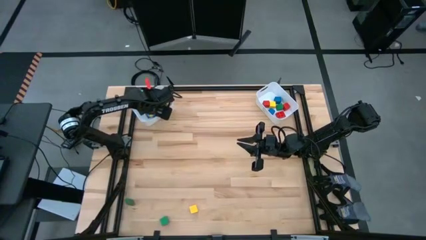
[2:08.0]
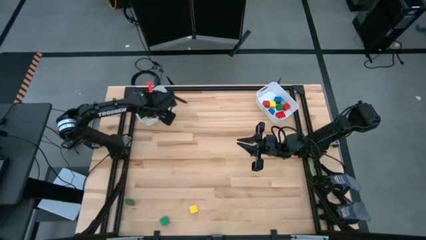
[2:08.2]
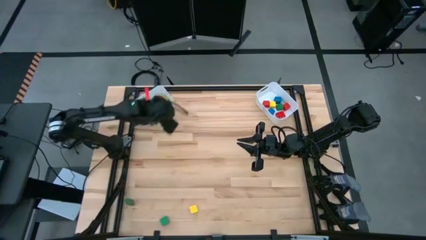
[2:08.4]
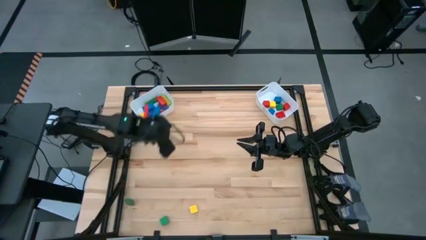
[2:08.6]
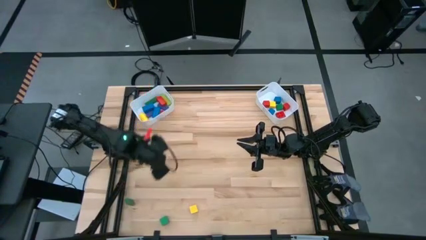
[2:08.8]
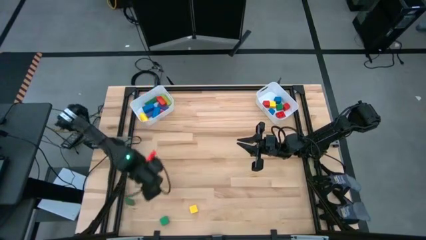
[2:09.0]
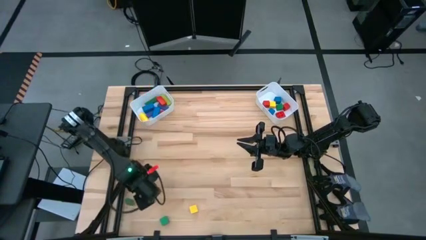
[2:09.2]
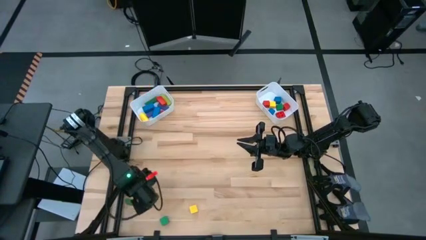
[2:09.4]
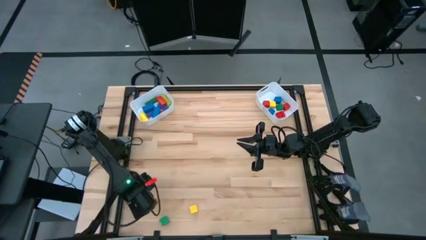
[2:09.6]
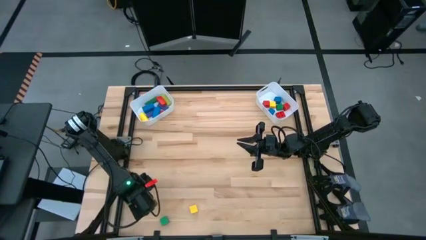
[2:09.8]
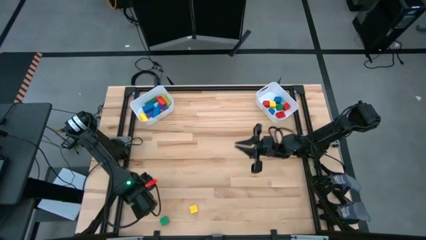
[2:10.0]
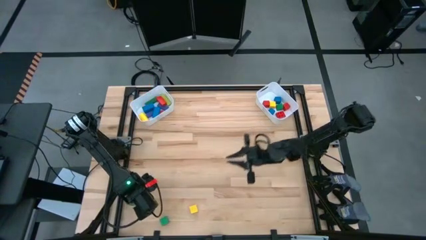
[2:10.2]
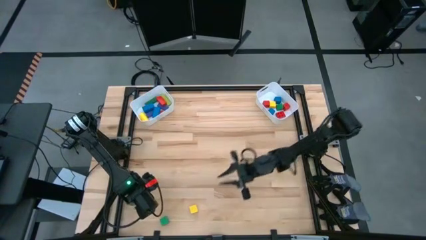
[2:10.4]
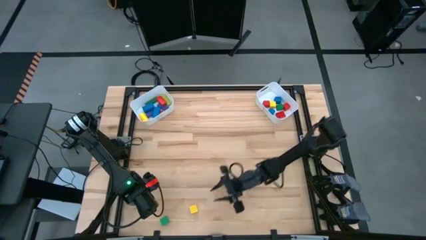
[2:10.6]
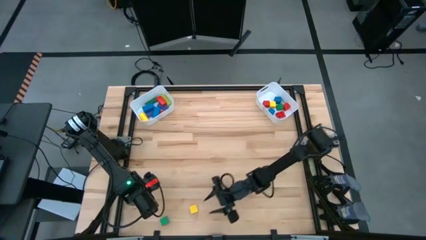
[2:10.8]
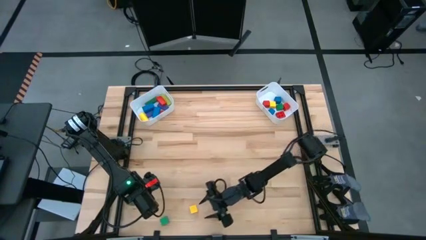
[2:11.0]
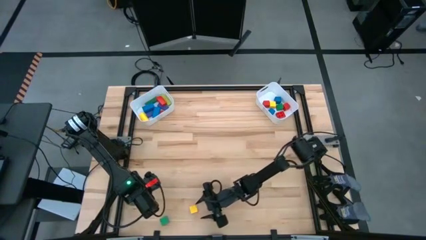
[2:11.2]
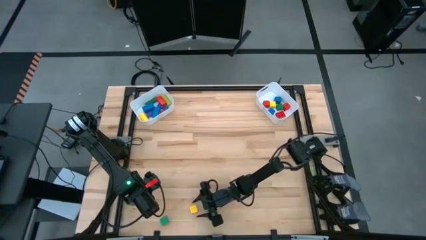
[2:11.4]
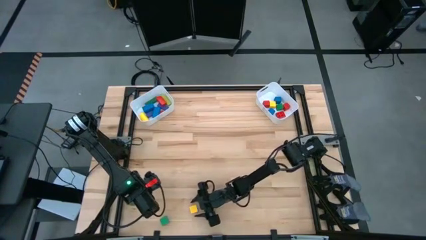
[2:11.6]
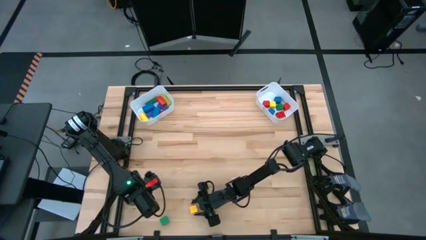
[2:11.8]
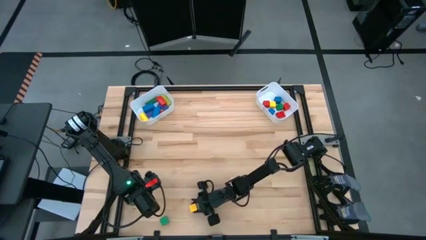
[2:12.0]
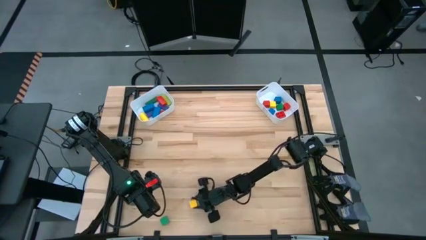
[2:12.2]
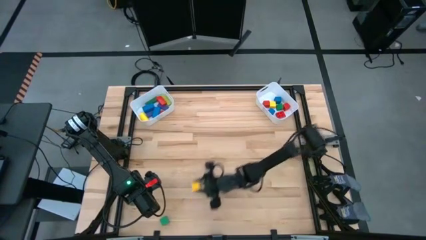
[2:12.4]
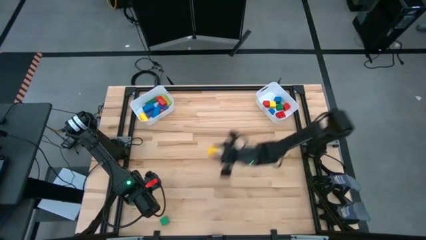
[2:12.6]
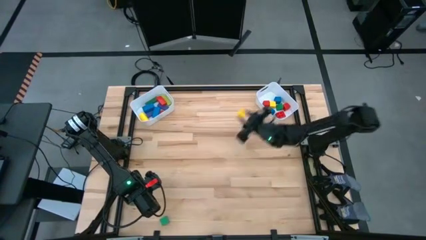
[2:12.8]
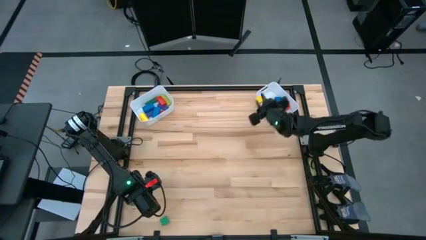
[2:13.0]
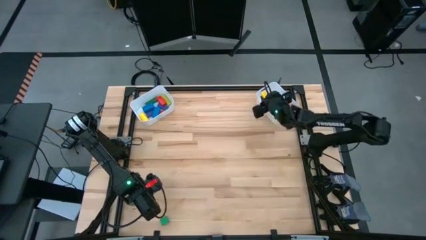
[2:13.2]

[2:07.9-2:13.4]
Task: Sort blocks by size
Put the small yellow block into the right white bin

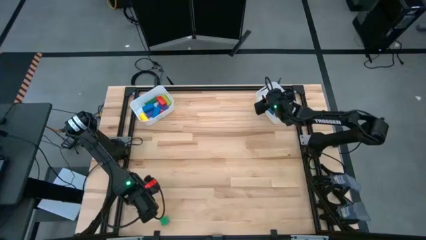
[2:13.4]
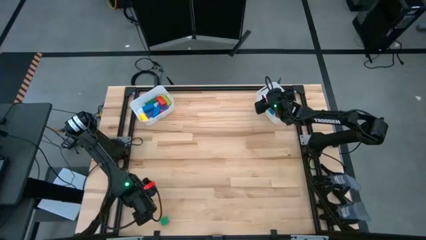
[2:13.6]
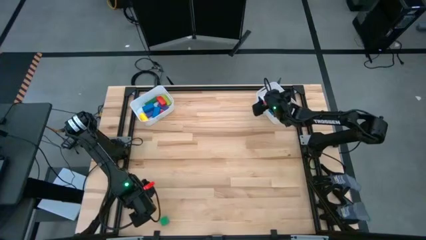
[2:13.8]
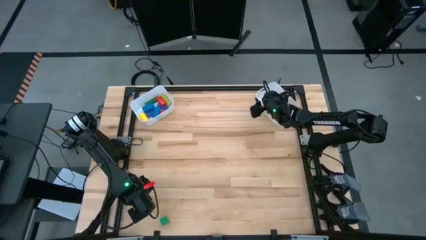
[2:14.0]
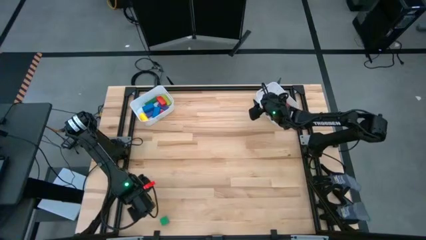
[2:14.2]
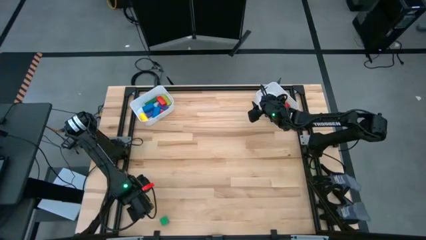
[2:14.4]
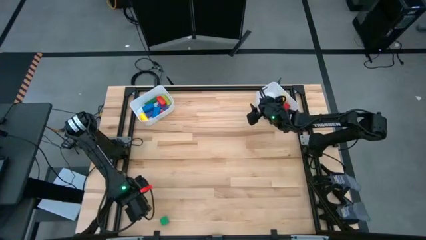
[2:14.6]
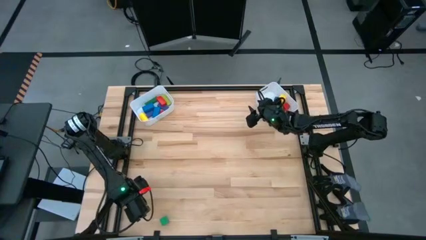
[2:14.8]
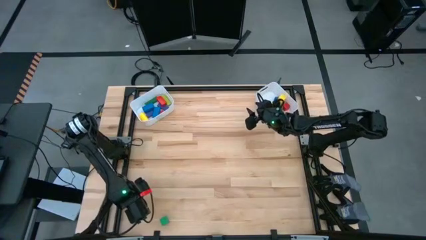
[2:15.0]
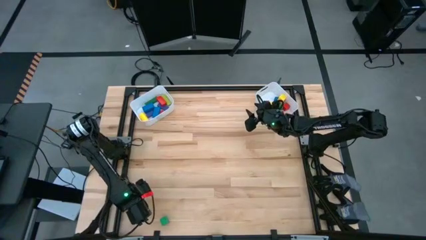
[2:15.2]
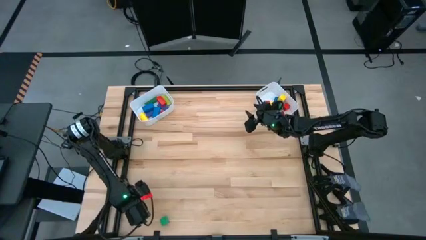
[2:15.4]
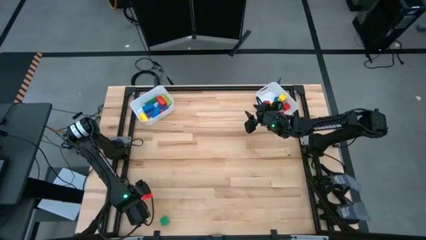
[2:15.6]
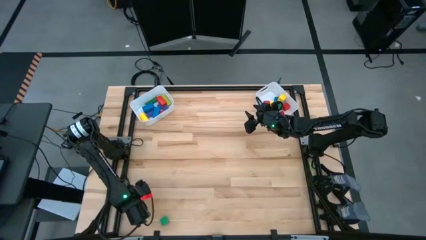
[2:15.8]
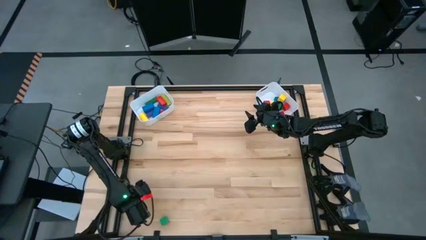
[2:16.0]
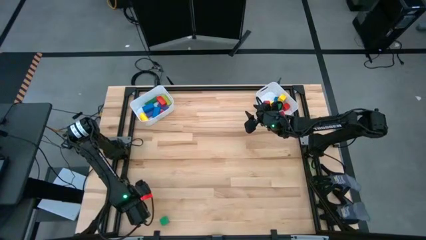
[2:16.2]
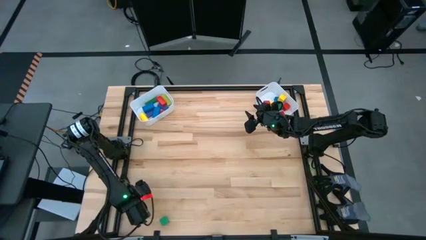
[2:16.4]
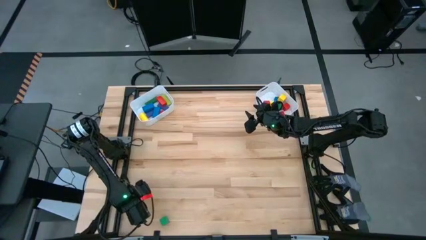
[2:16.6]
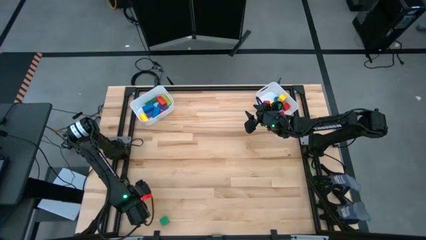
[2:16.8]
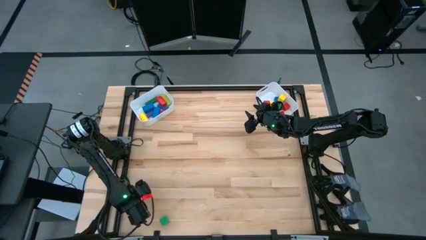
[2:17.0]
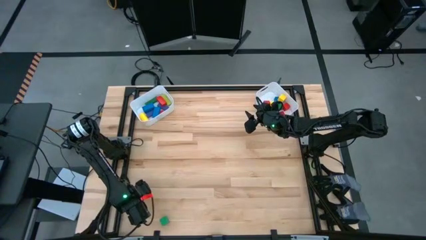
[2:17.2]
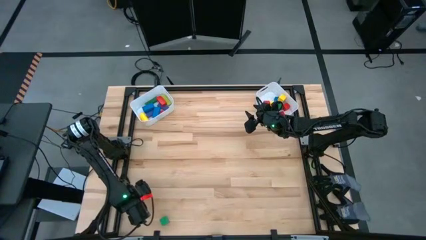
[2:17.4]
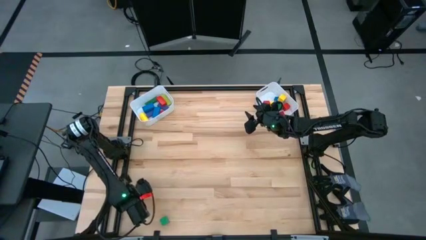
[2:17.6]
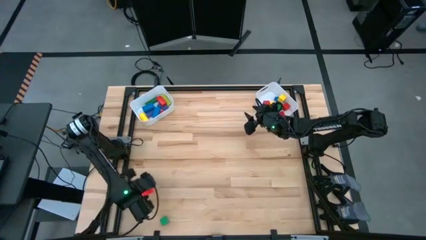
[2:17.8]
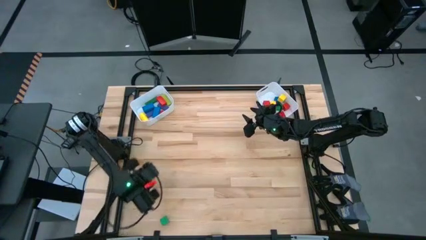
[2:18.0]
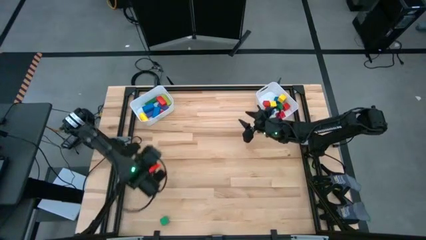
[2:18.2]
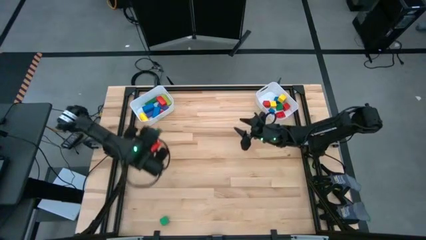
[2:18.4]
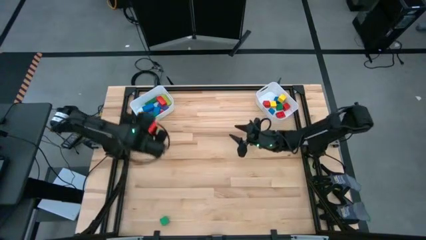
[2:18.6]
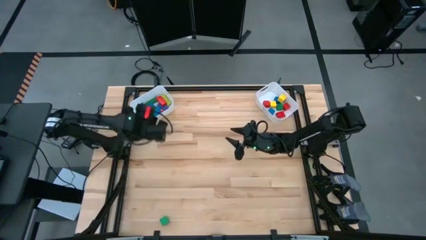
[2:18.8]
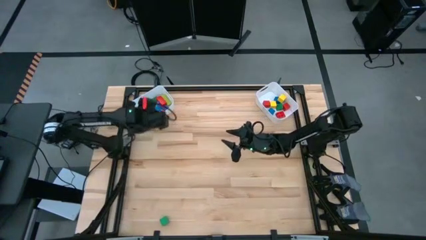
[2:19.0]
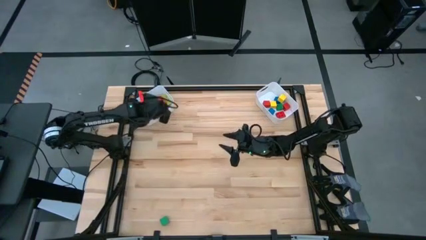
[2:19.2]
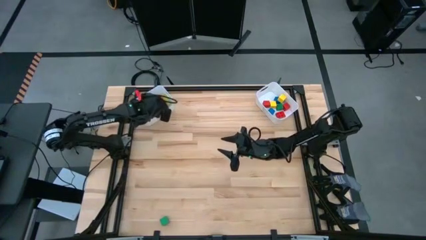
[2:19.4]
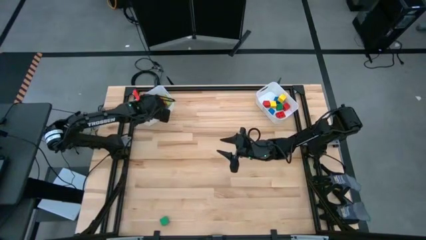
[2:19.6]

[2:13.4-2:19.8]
Put the large green block into the left white bin

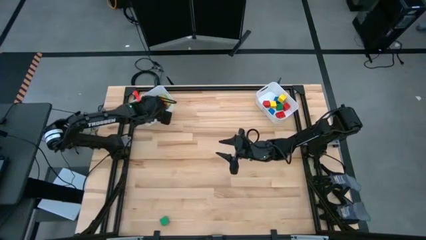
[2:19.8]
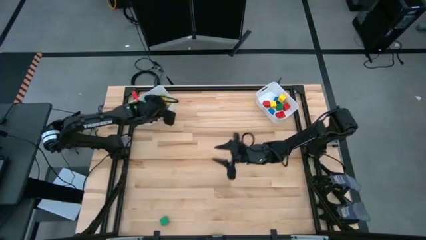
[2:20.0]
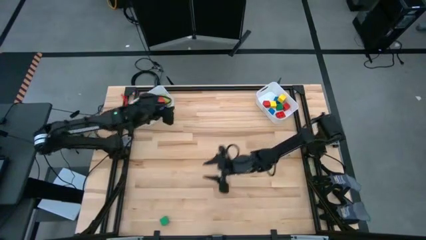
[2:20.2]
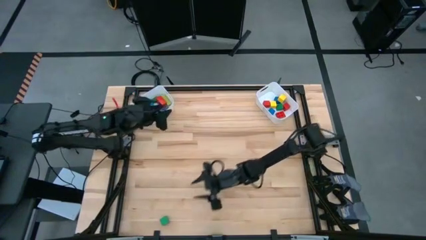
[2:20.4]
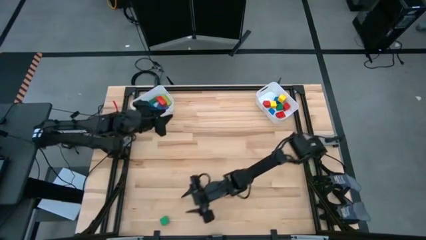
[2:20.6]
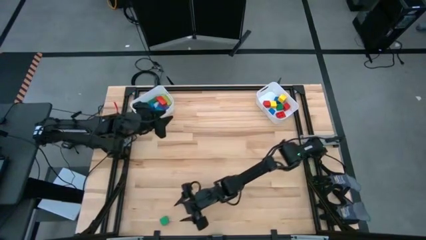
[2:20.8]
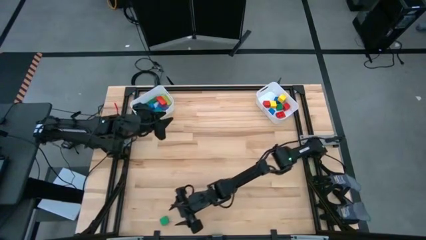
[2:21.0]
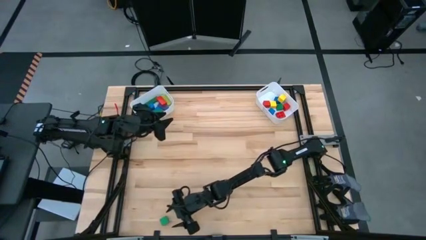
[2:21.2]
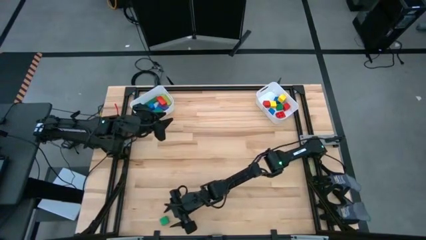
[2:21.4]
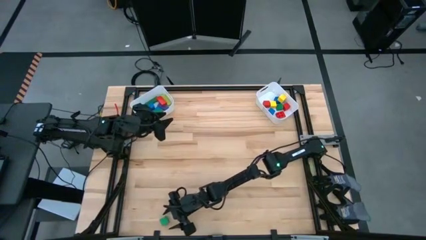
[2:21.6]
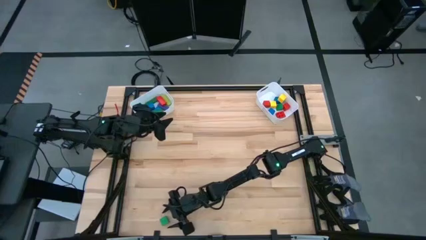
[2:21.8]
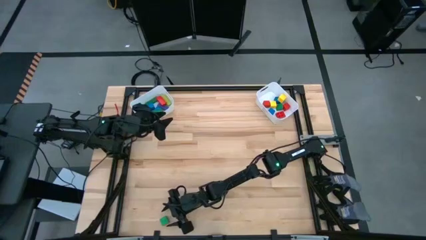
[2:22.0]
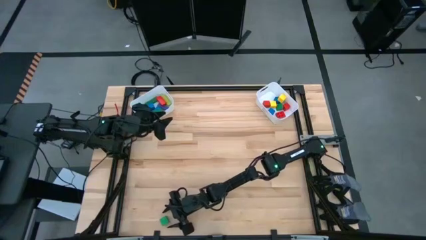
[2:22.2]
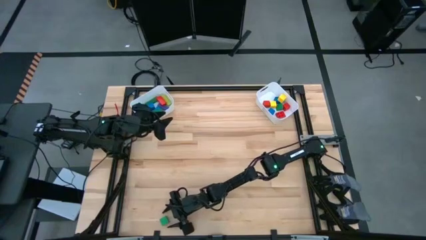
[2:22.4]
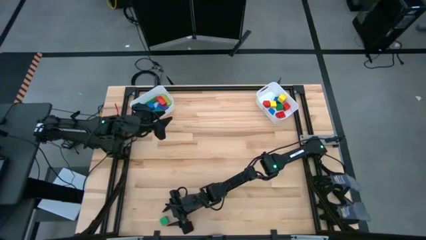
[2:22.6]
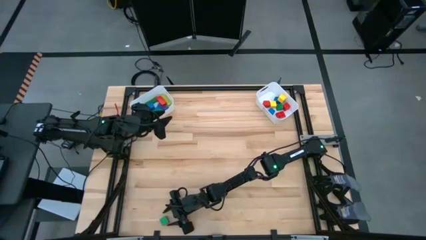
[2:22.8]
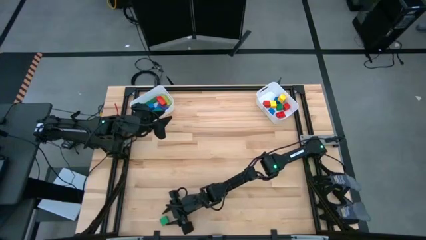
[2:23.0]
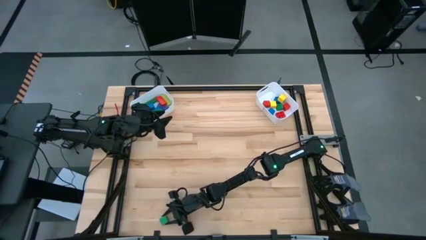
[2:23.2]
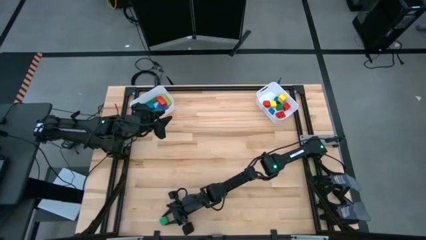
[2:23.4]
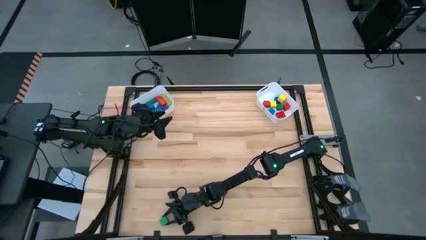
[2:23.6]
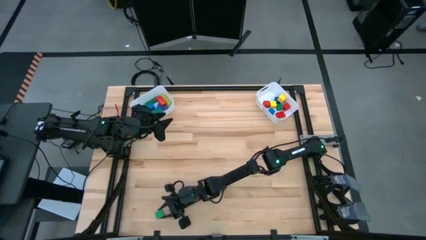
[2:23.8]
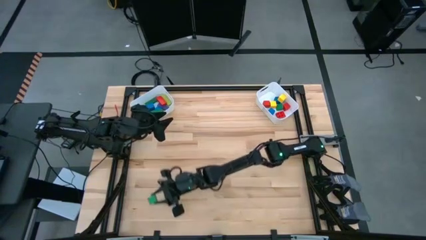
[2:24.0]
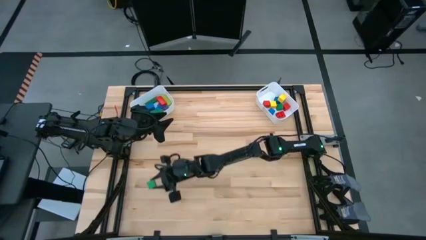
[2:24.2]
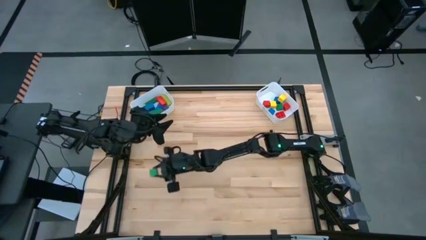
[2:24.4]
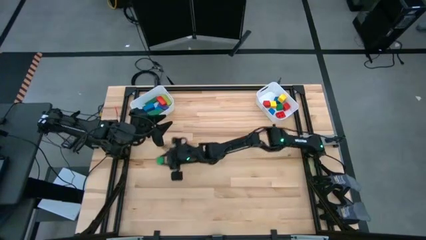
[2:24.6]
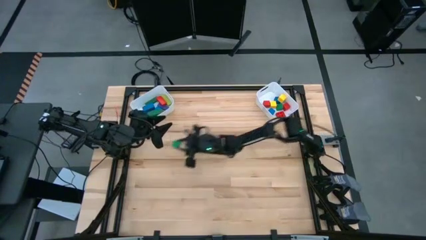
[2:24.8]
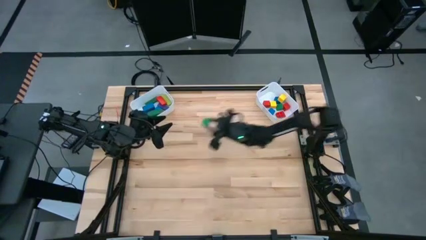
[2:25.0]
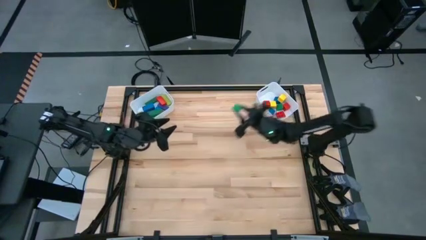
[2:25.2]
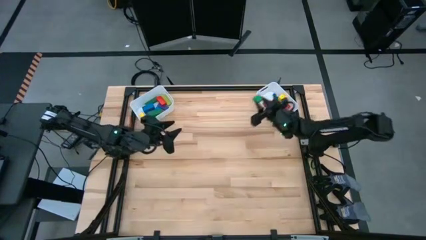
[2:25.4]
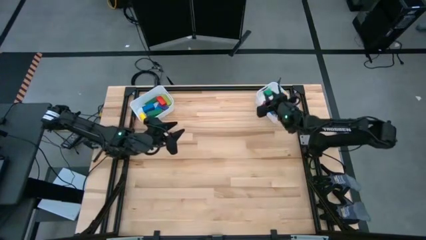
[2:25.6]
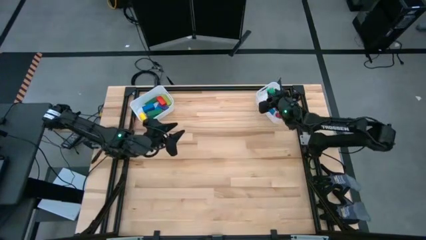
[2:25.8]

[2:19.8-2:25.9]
Put the small green block into the right white bin
